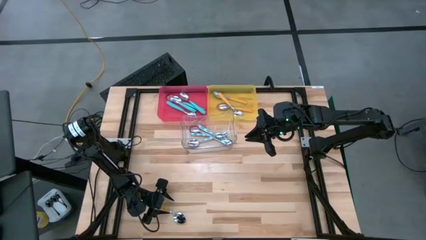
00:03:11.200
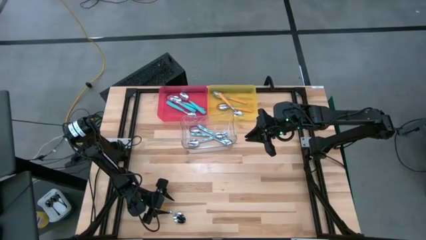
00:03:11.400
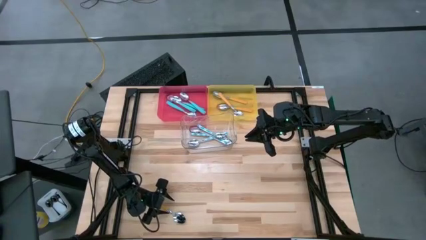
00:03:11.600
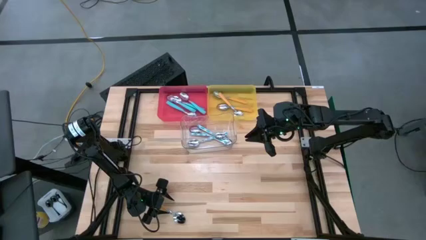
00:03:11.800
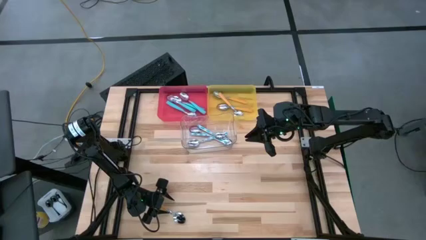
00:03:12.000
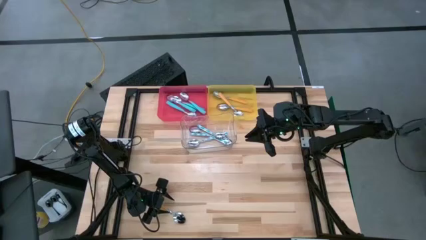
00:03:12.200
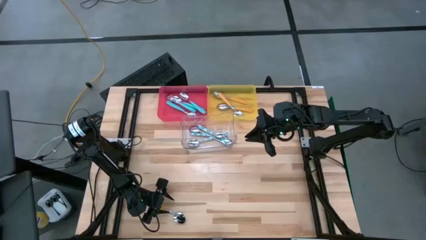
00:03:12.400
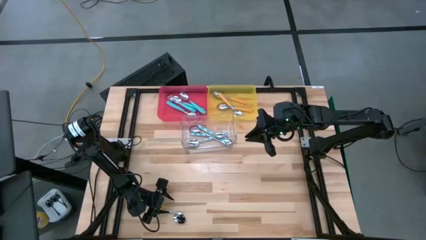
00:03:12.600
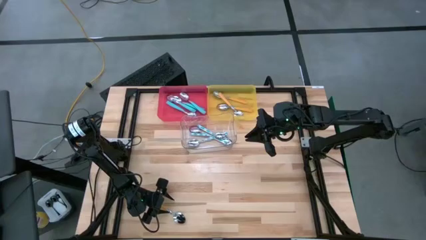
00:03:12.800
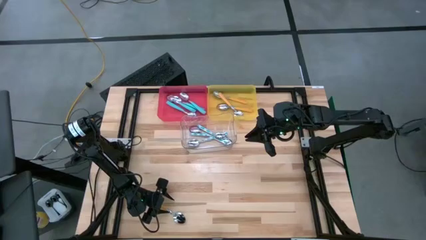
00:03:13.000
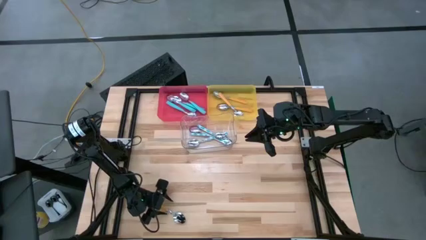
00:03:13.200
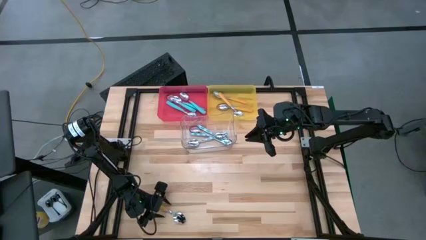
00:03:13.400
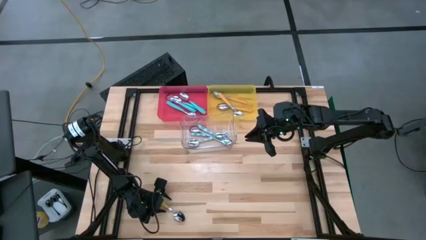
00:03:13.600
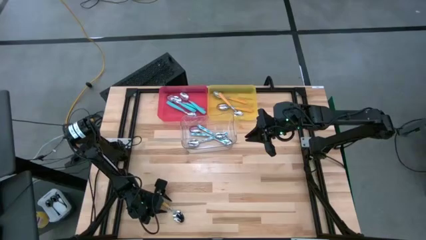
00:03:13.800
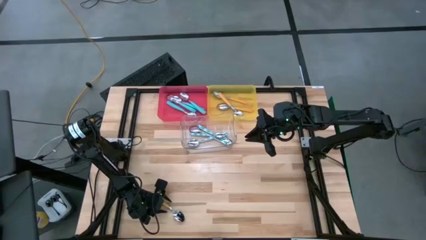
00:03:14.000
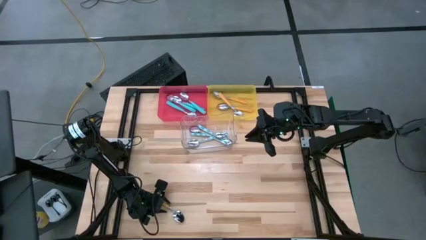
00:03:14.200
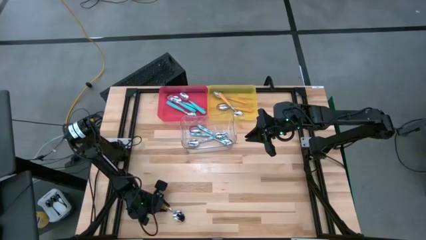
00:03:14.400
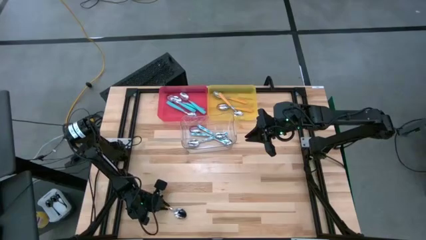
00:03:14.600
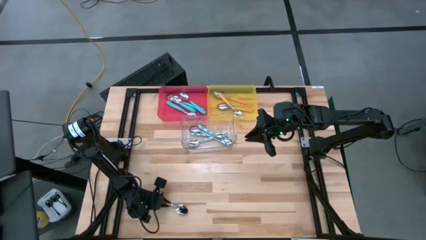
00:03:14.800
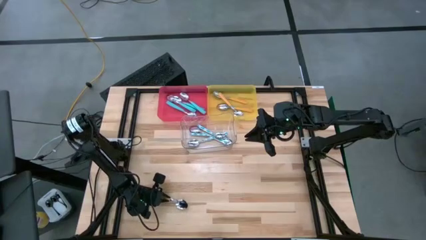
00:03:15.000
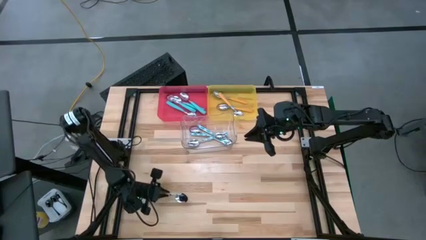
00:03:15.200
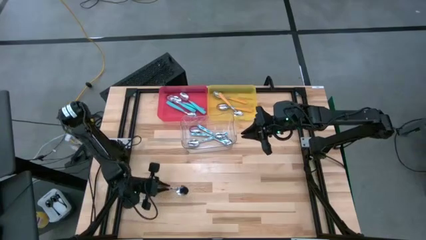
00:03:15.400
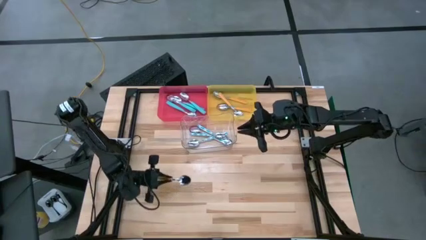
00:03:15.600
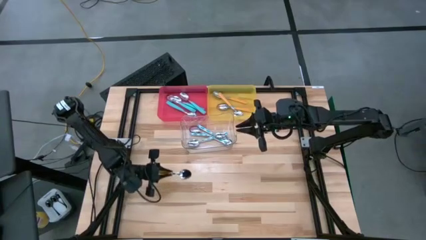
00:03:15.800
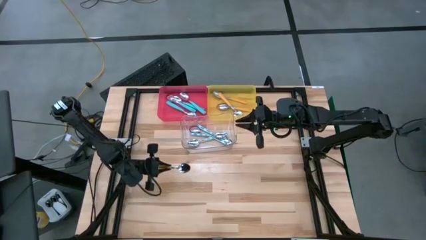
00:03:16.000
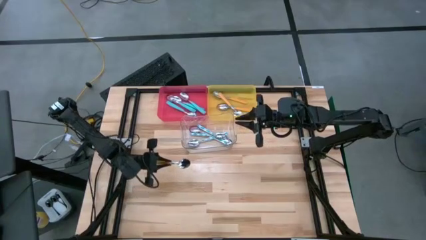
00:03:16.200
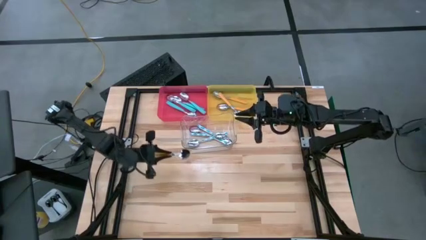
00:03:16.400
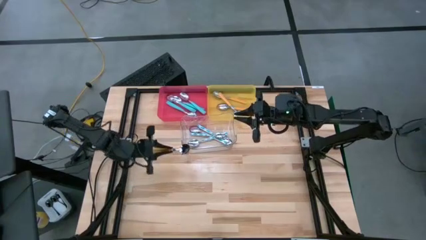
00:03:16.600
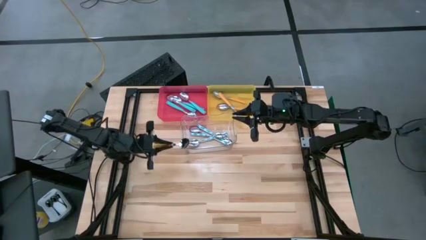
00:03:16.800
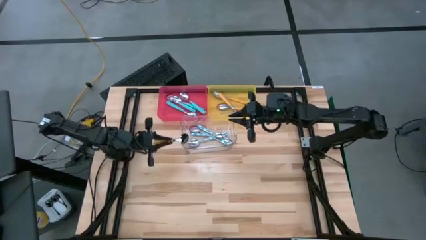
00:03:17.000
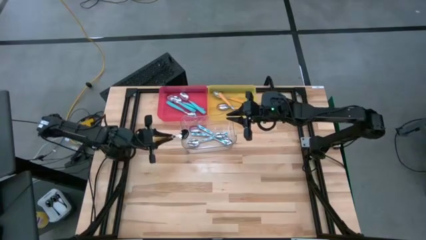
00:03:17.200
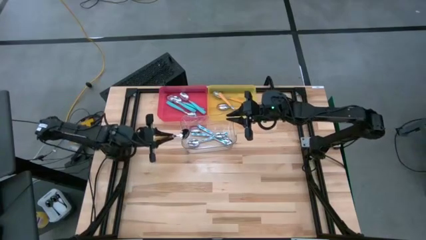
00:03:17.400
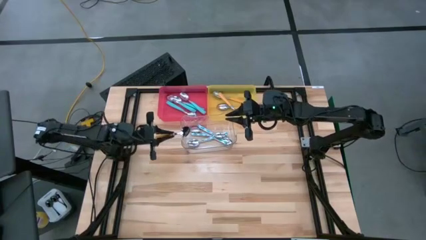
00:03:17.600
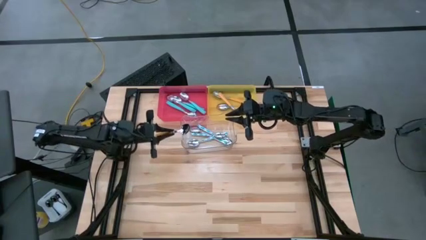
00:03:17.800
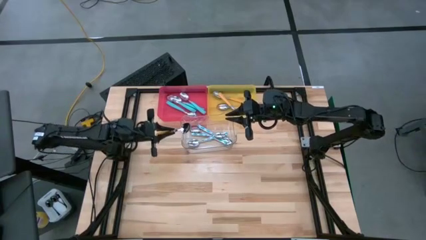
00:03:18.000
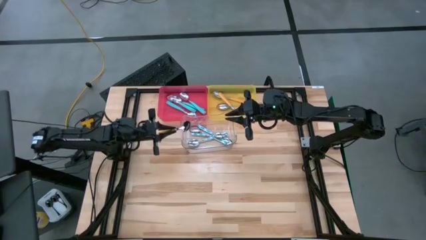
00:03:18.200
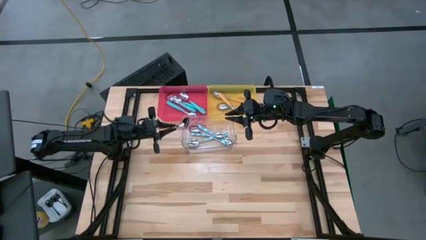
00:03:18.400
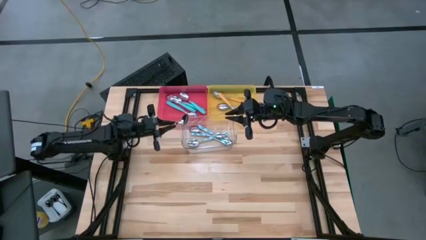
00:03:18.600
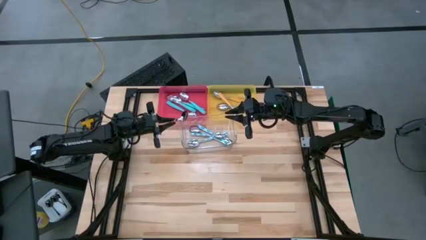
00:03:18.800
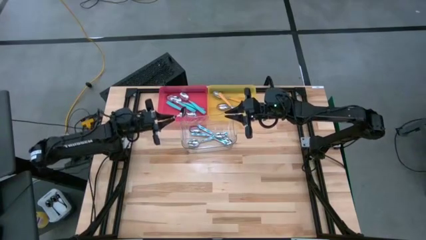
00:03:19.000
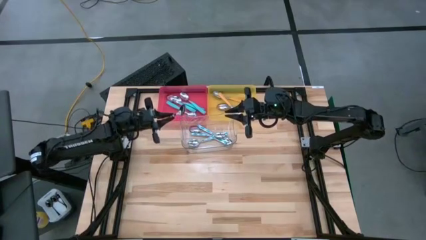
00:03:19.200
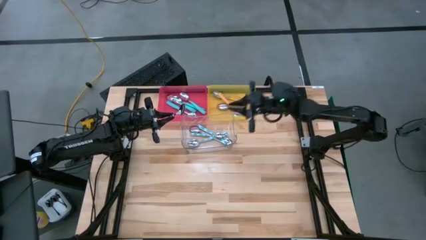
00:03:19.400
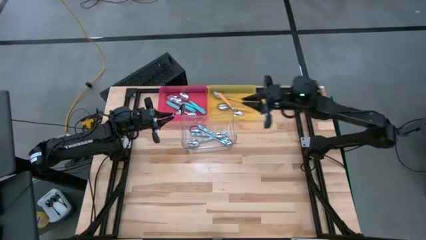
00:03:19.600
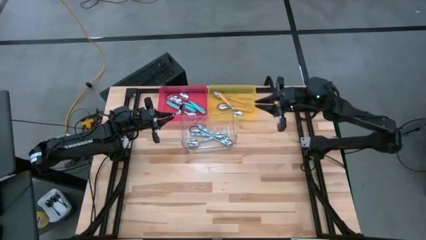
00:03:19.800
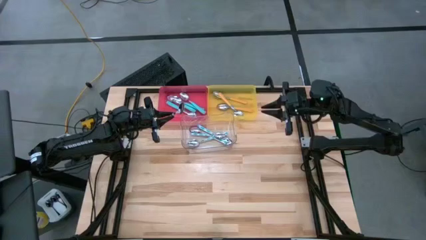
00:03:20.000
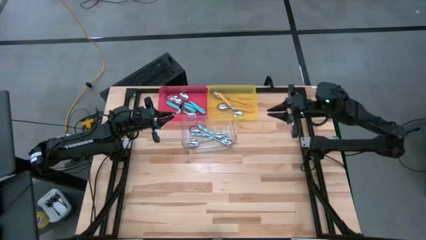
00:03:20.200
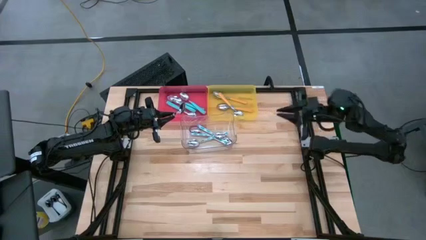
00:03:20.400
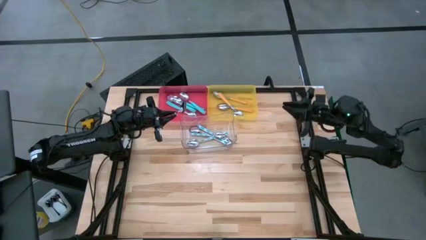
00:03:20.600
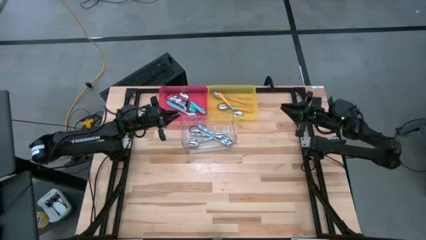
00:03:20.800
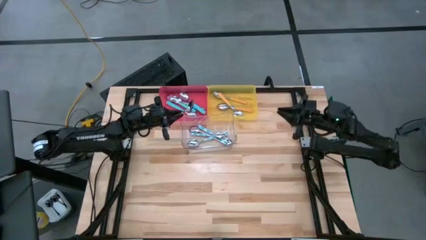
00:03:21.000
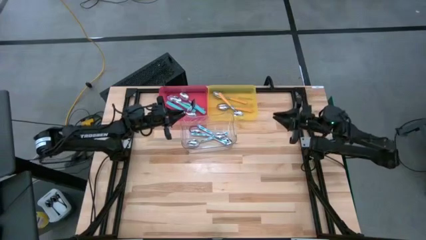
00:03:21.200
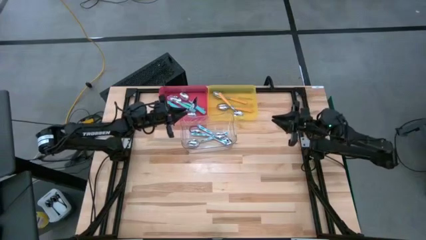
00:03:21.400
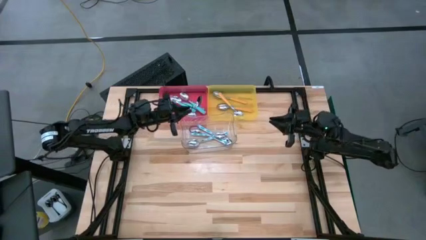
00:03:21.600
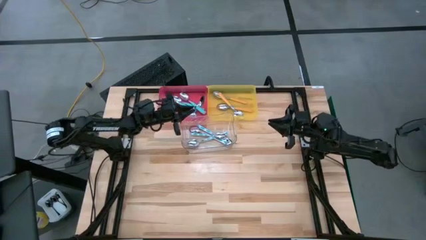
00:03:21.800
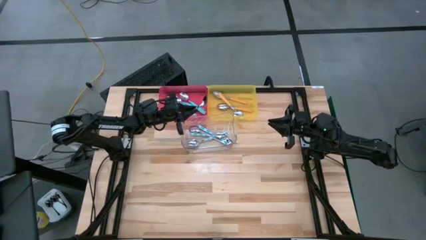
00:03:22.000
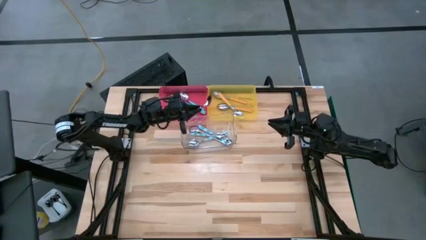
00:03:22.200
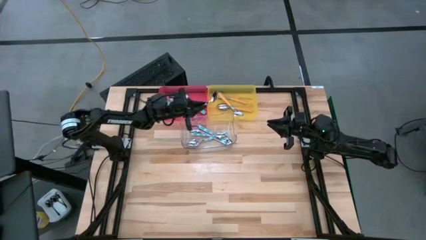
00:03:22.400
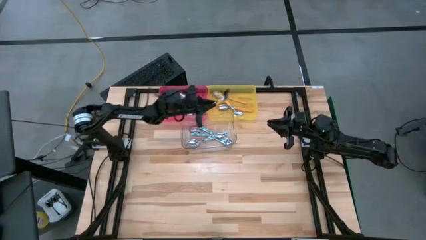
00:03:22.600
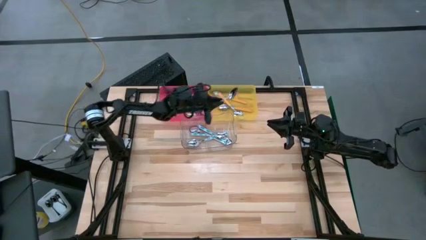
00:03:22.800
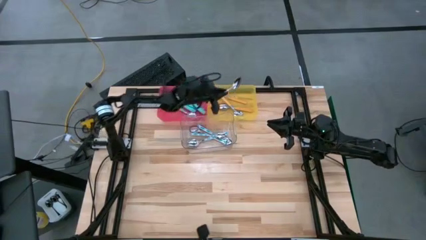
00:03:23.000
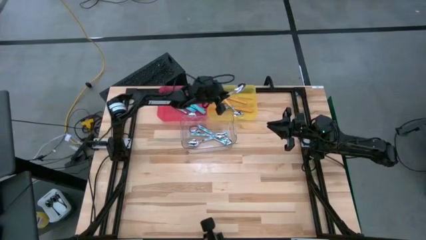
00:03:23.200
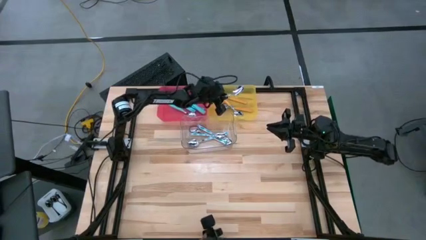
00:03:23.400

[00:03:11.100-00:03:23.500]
Task: Sort silverware by color (type)
Put the yellow spoon into the yellow bin
